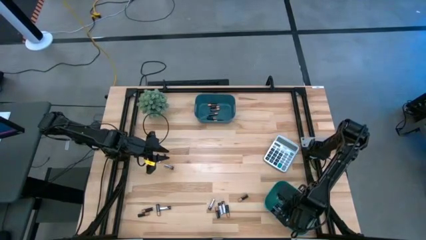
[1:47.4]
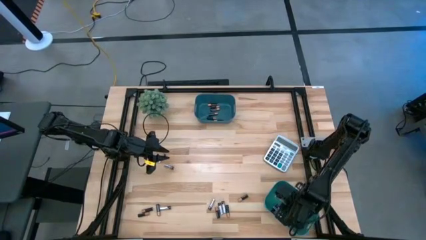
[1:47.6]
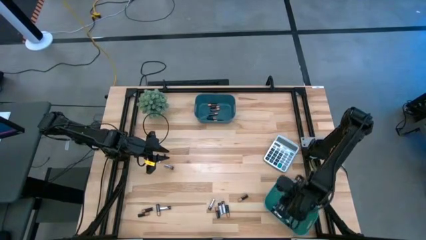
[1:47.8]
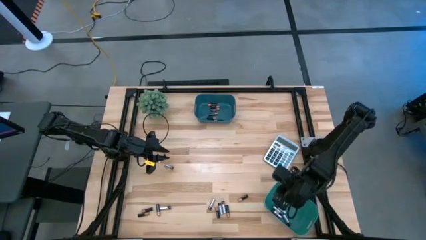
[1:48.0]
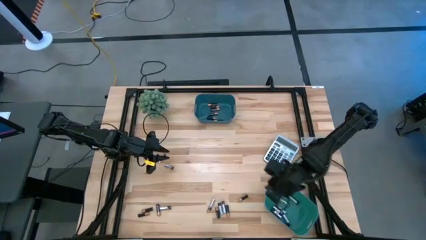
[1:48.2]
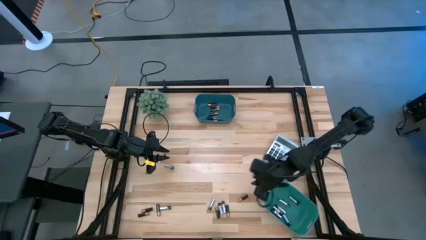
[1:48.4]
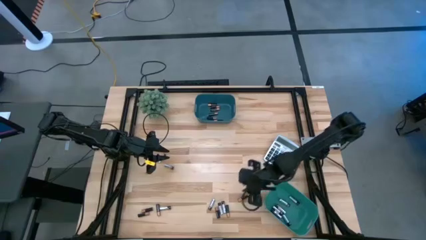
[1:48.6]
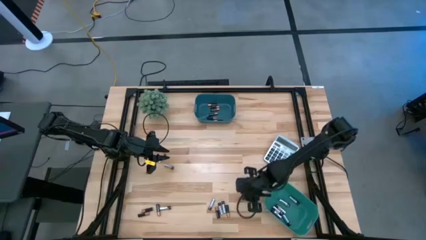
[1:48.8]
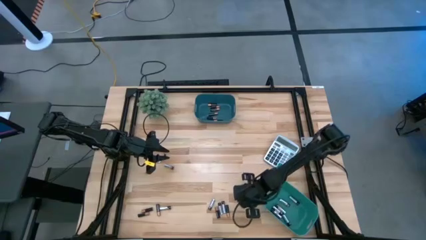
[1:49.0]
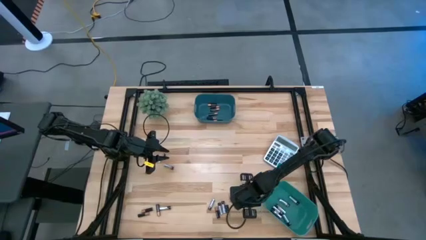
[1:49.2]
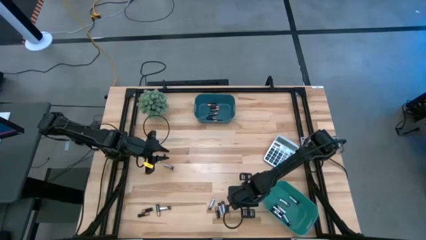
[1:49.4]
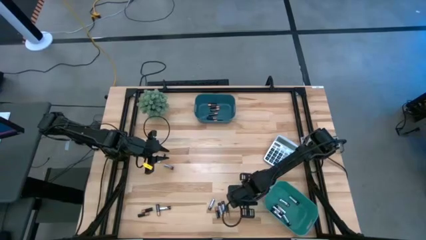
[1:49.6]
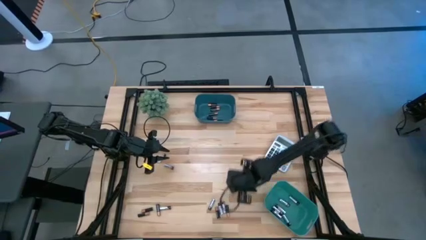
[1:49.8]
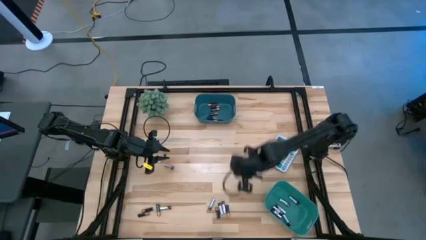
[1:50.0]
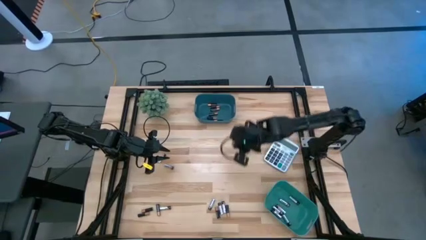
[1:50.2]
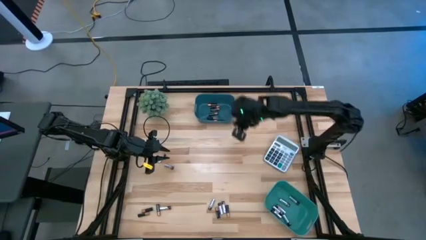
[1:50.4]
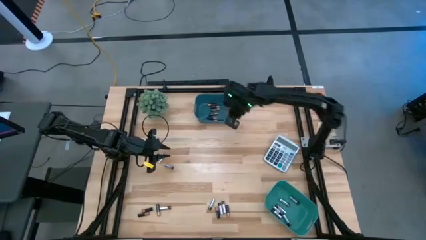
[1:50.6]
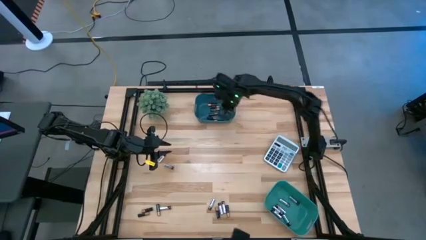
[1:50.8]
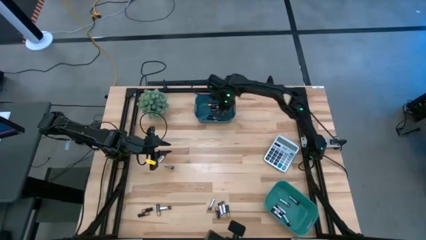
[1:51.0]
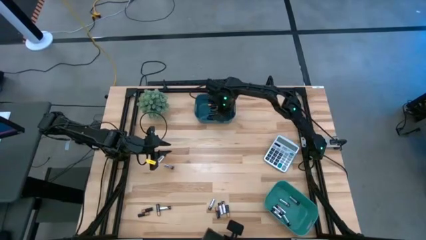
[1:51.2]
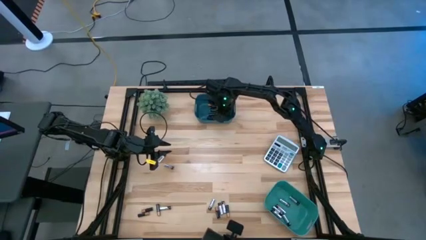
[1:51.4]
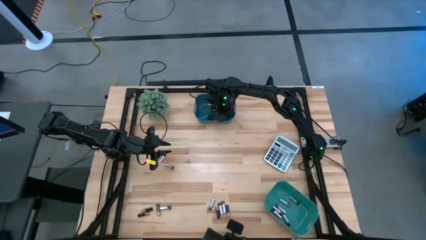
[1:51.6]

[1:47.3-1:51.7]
Task: Sort batteries
Put the black battery into the blue bin

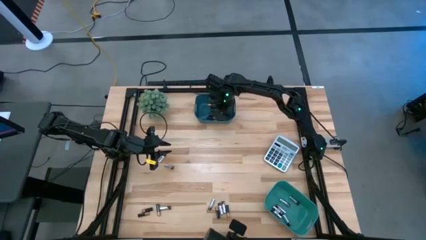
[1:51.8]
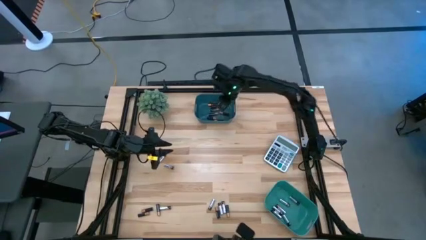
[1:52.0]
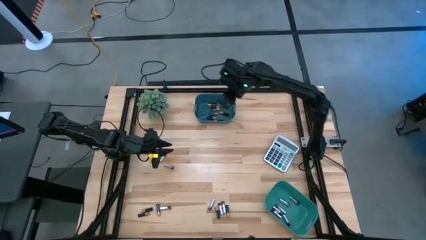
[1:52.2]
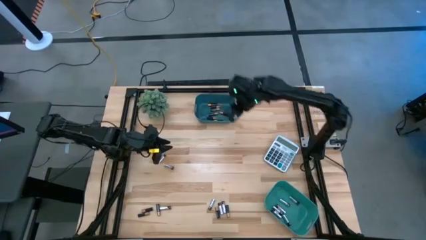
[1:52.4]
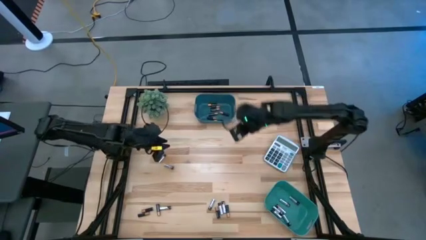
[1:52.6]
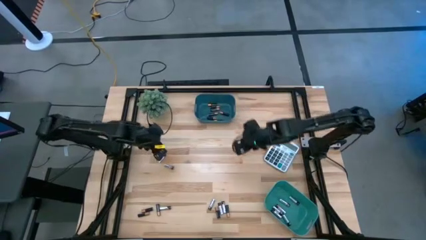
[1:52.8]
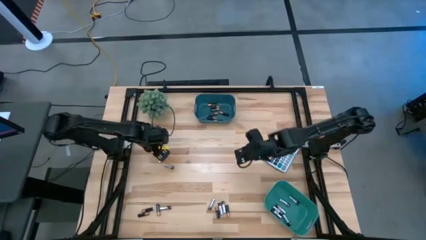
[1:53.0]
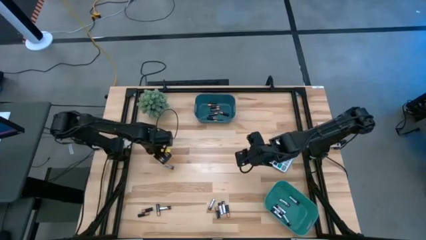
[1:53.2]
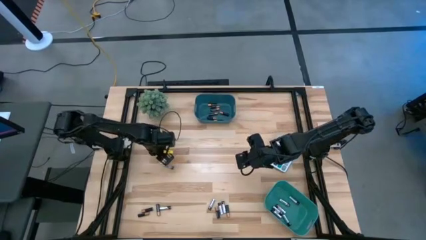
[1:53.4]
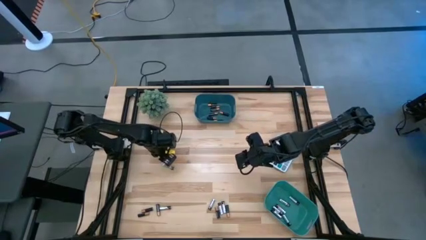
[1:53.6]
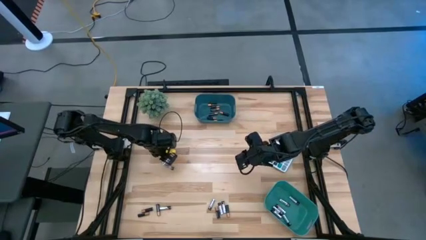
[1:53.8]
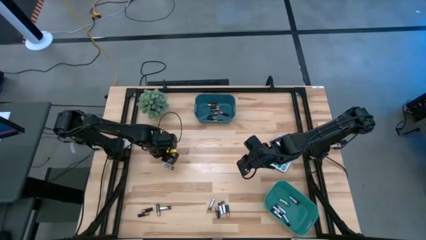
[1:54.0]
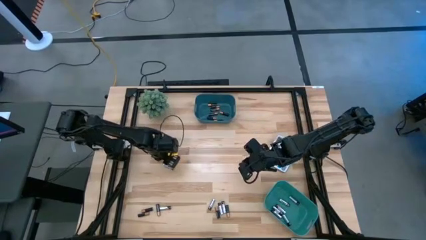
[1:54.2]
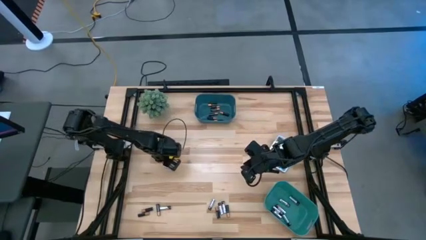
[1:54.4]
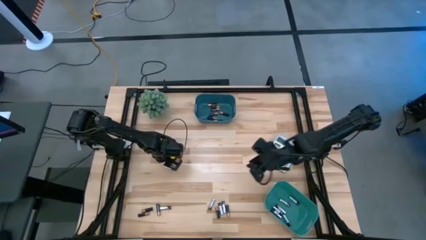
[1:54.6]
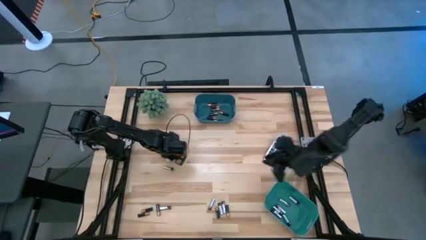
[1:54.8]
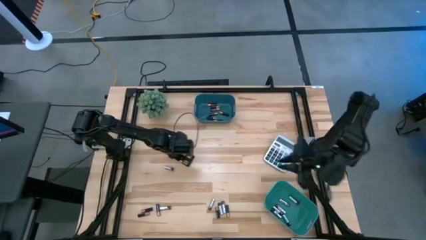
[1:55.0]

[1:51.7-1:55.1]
Put the silver battery into the green bin

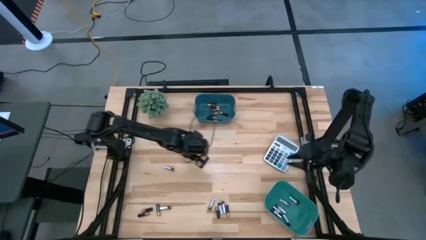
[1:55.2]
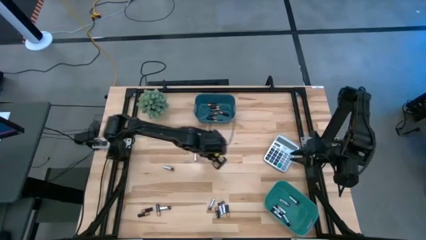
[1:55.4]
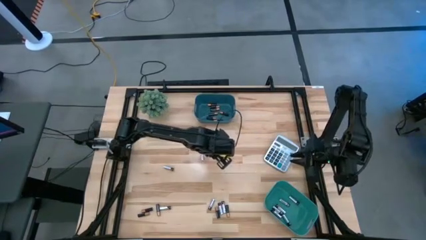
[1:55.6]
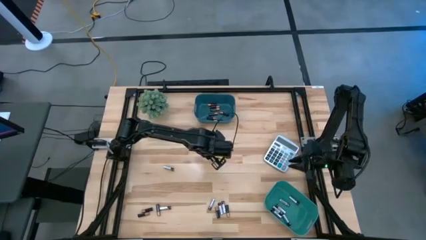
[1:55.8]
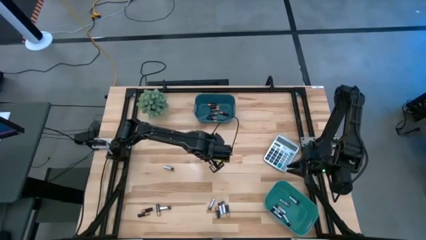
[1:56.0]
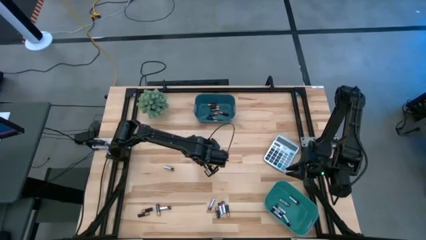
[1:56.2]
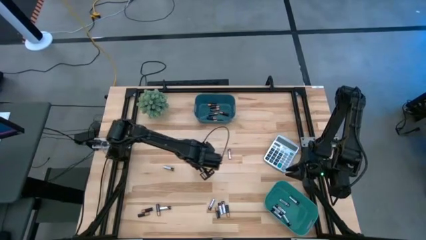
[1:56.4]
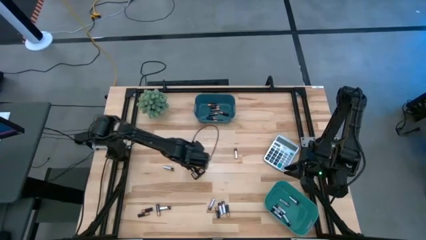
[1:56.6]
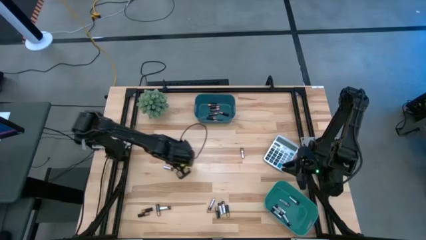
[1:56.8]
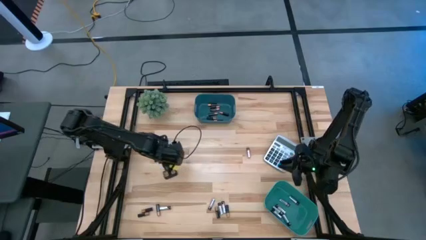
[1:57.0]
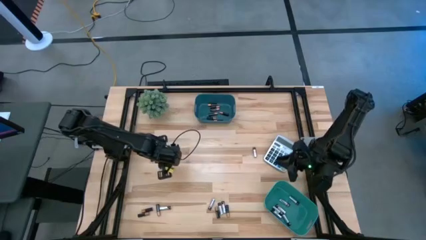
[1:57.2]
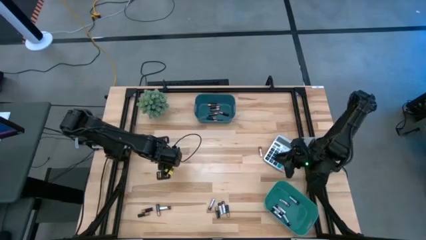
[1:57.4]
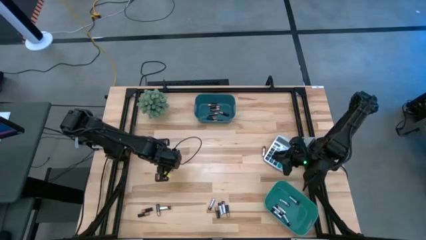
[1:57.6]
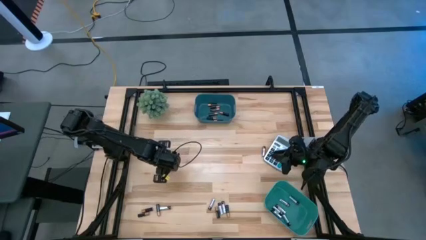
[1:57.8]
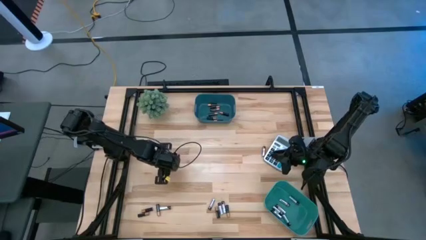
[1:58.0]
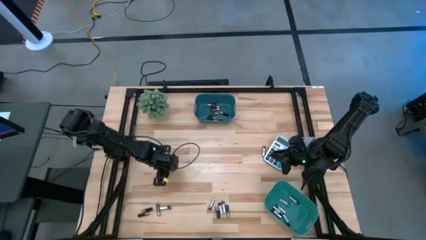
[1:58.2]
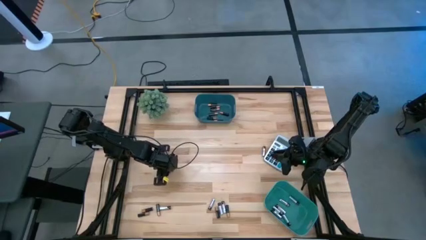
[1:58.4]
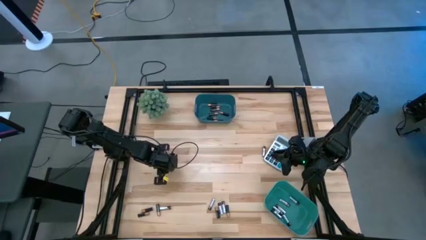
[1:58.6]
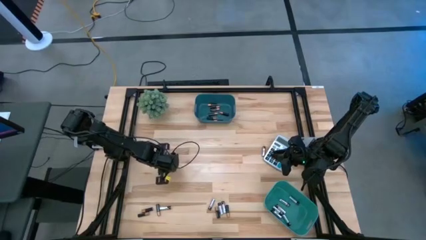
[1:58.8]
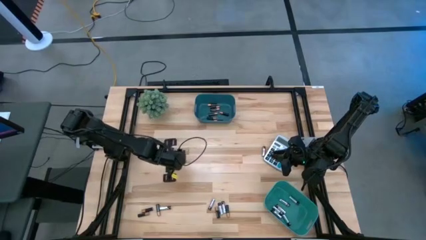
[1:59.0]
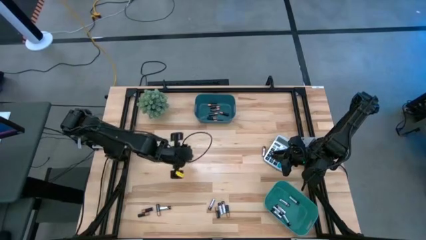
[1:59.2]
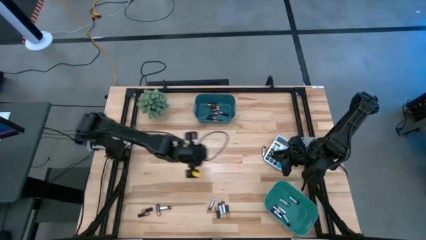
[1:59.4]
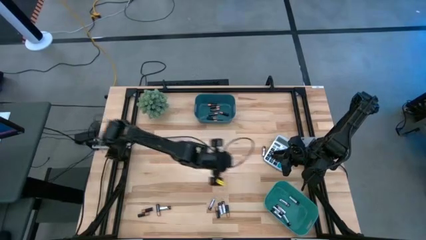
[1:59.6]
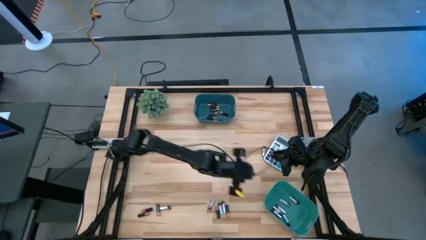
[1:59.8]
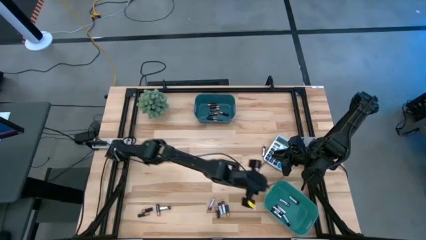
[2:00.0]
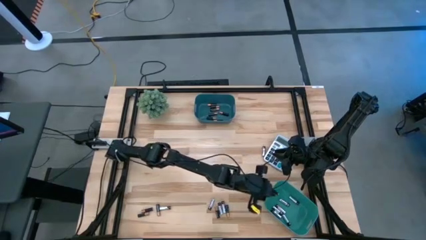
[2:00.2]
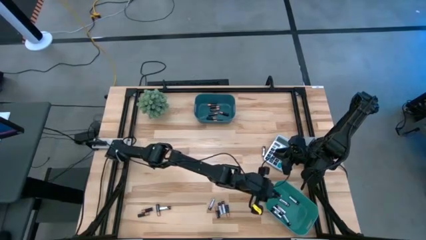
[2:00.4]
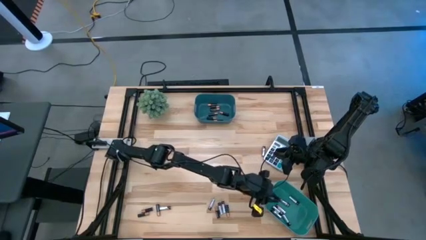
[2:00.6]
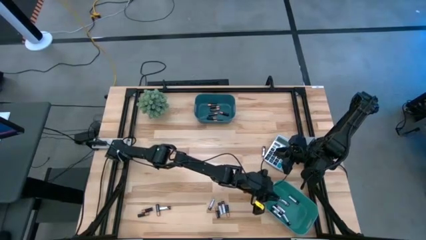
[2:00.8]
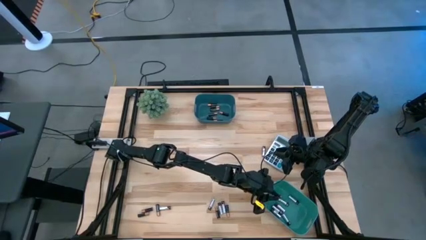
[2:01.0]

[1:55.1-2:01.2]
Put the silver battery into the green bin

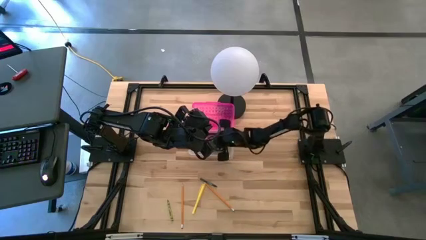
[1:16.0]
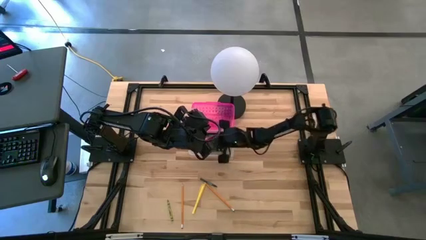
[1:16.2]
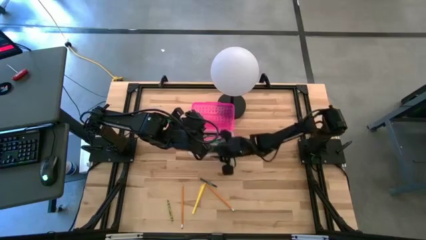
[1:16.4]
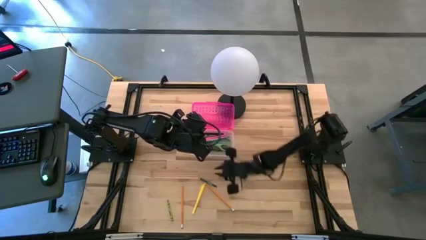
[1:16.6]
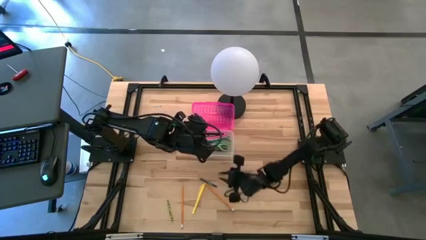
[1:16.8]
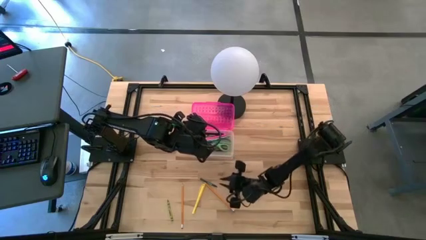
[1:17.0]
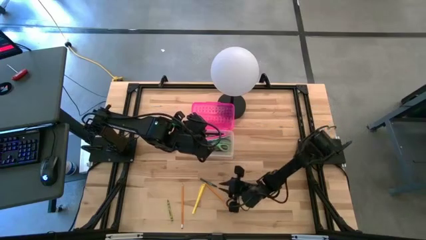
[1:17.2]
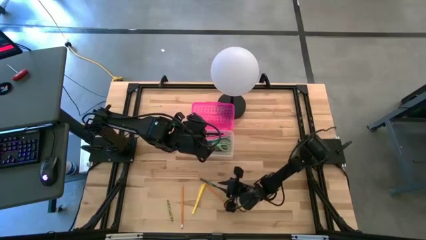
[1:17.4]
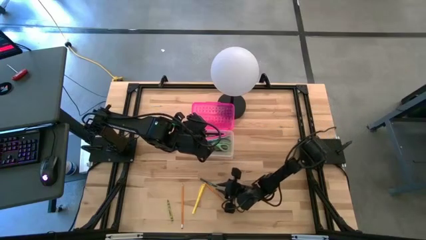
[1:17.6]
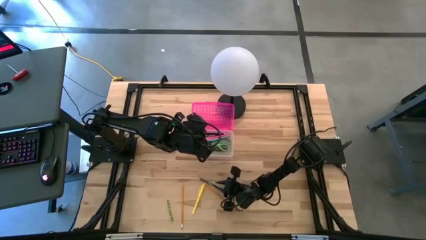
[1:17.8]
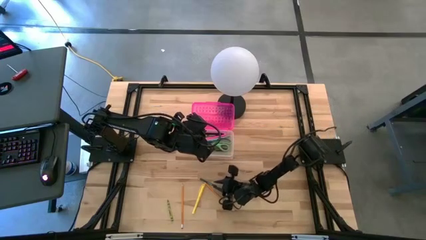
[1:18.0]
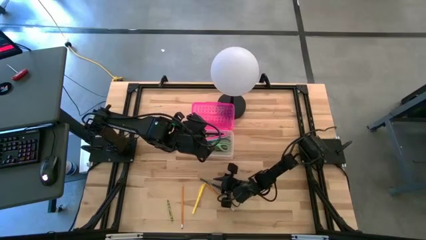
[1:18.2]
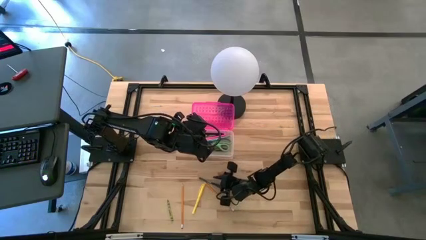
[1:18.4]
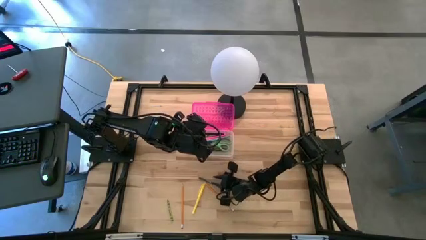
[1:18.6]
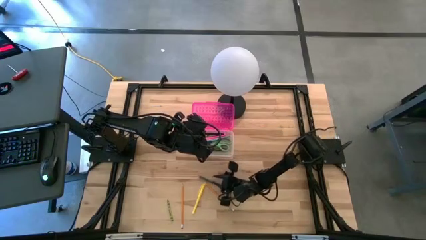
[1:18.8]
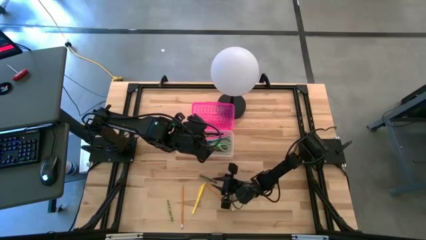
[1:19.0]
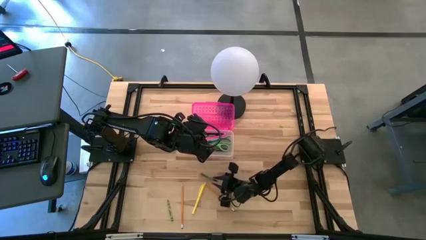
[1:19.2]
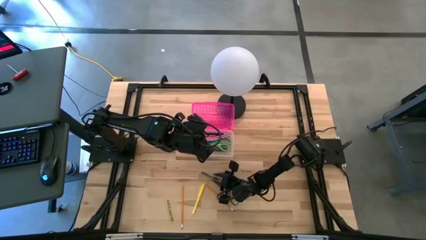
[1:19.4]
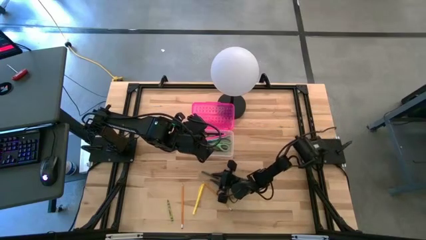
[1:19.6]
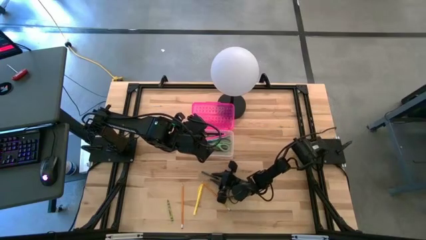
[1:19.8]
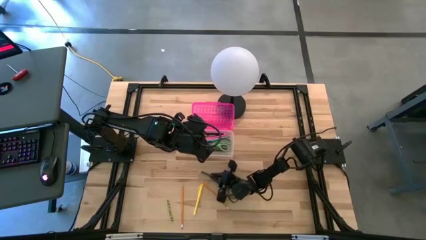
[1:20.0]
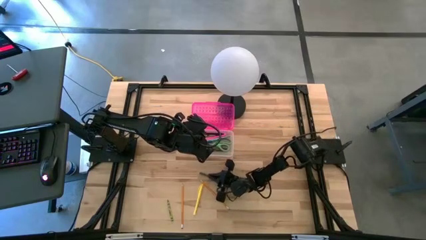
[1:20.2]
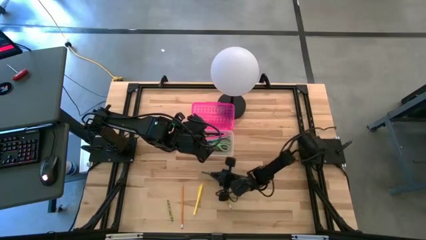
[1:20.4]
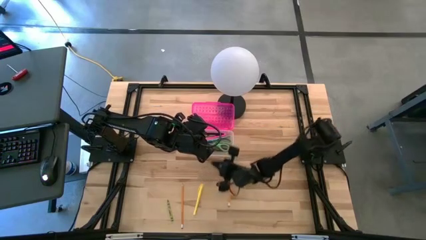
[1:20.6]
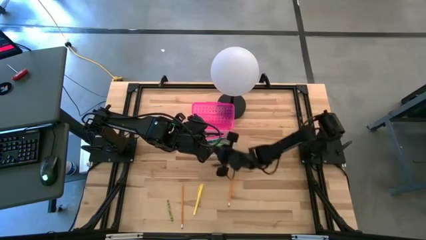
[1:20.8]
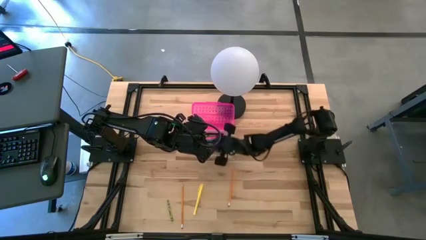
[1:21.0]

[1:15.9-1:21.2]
Task: Pick & place school supplies into a supply box
Put the dark green crayon into the pink supply box
